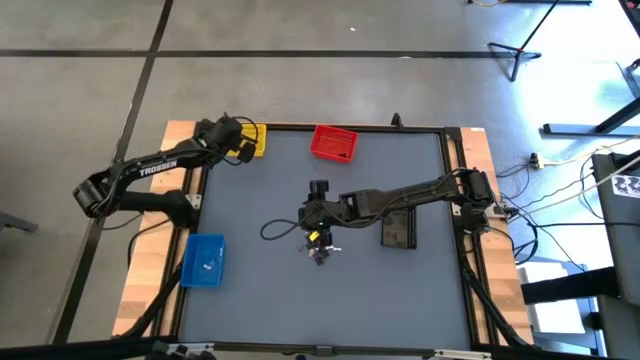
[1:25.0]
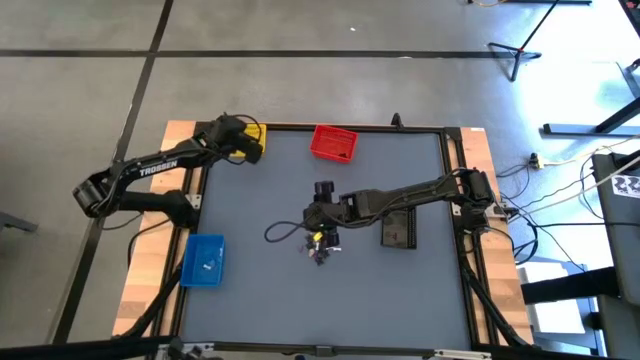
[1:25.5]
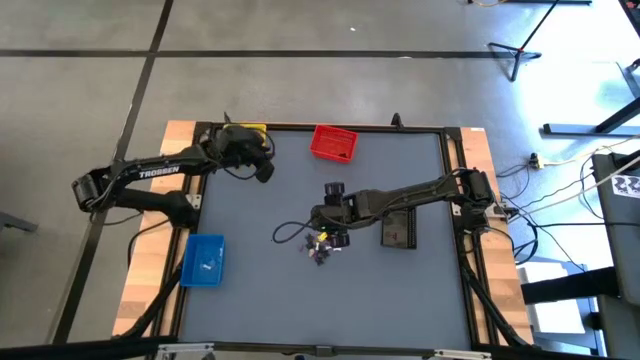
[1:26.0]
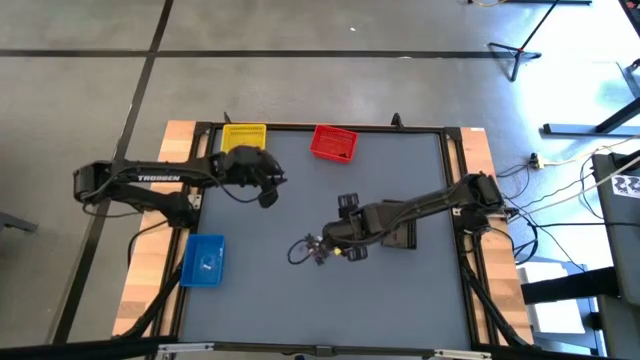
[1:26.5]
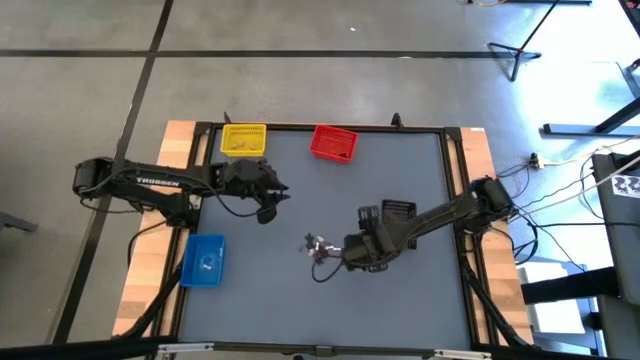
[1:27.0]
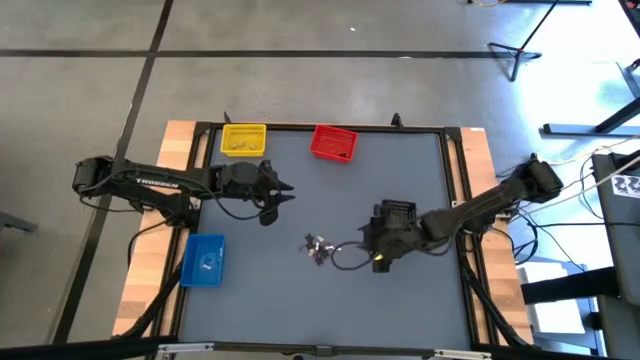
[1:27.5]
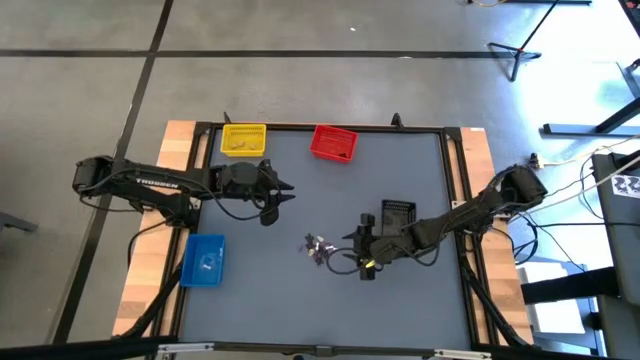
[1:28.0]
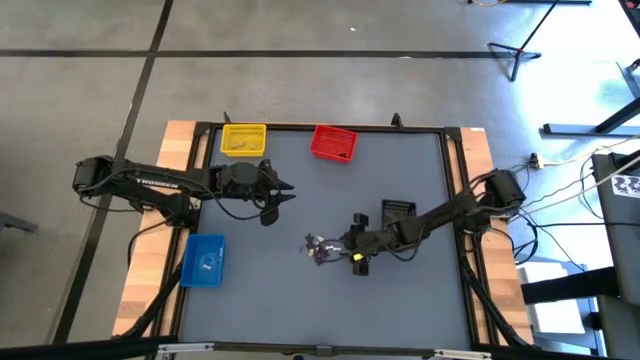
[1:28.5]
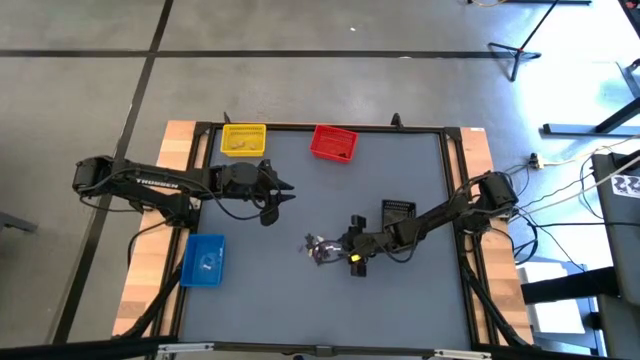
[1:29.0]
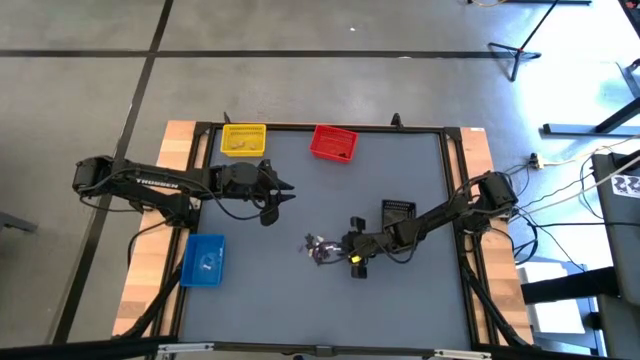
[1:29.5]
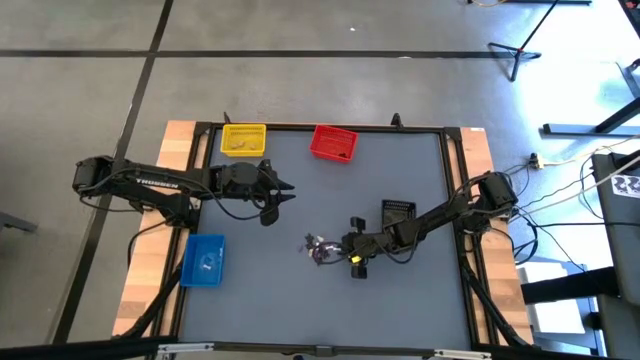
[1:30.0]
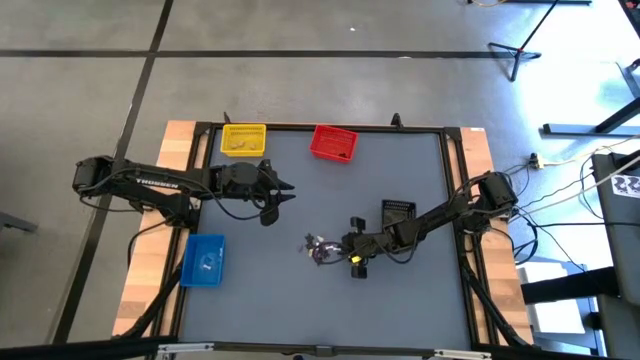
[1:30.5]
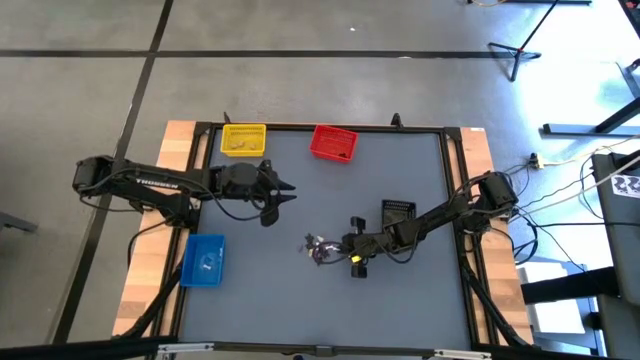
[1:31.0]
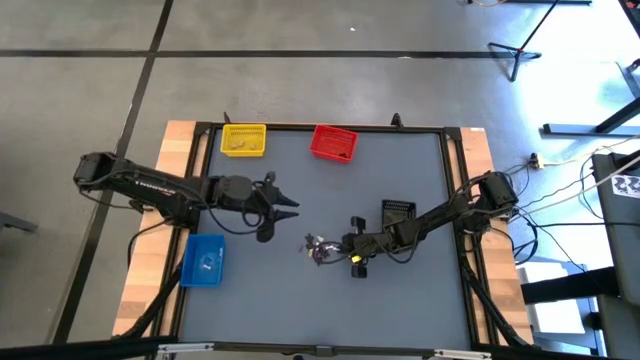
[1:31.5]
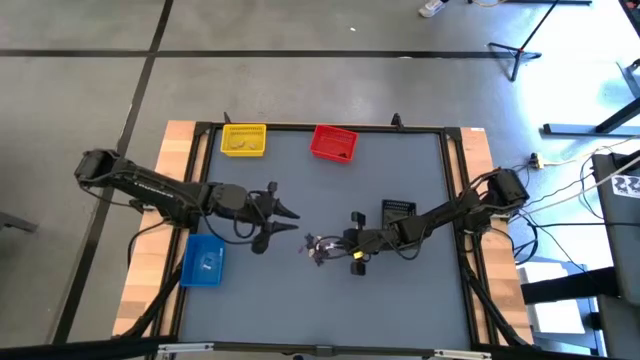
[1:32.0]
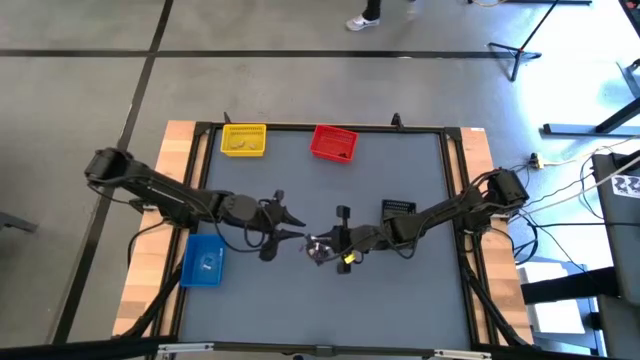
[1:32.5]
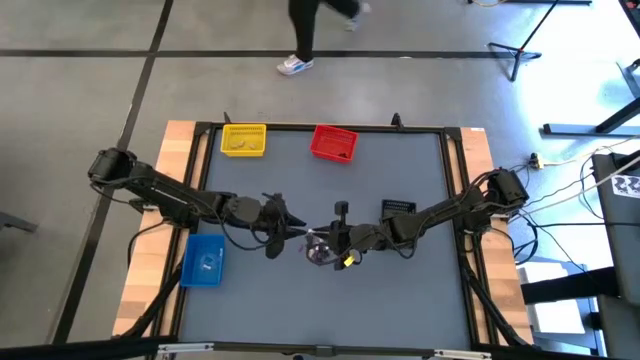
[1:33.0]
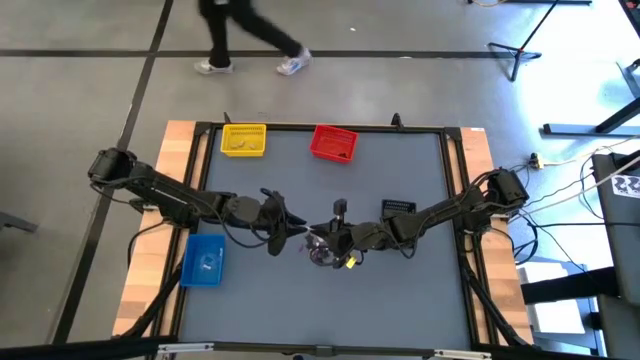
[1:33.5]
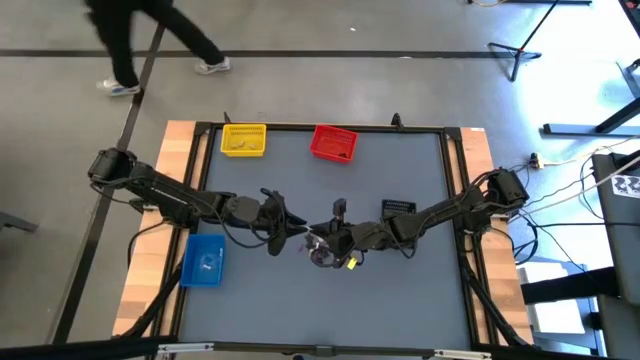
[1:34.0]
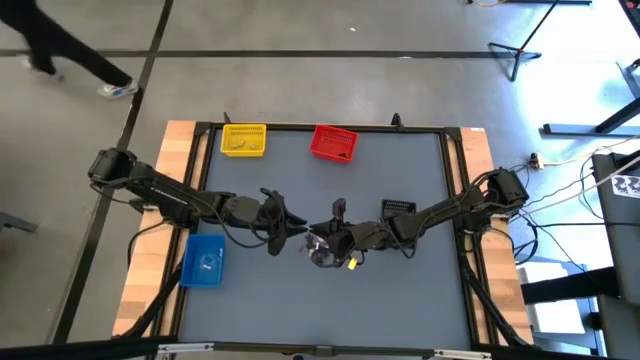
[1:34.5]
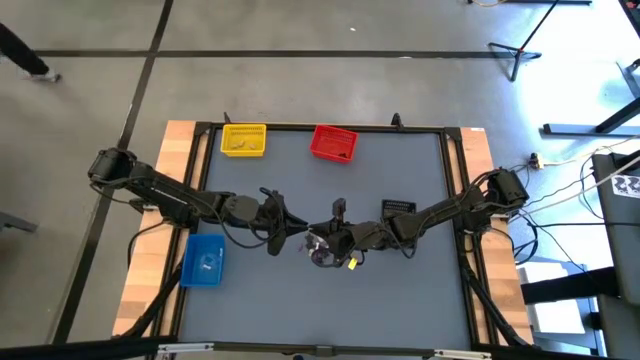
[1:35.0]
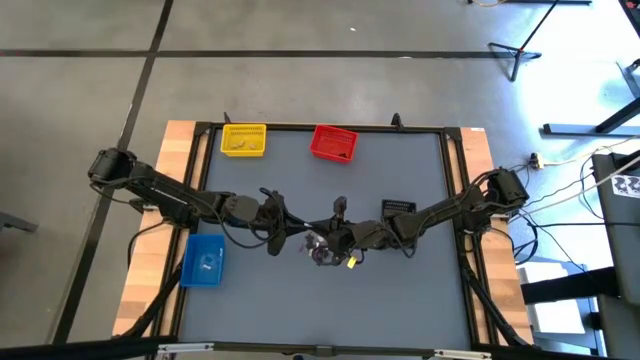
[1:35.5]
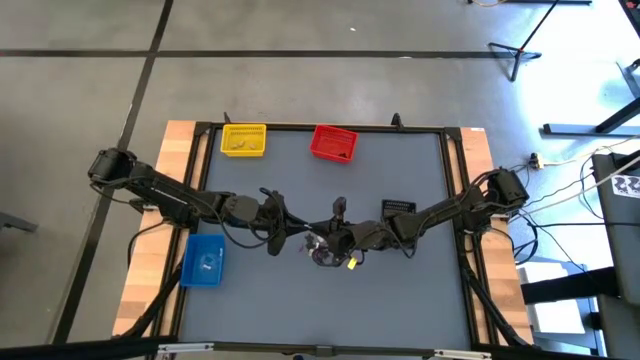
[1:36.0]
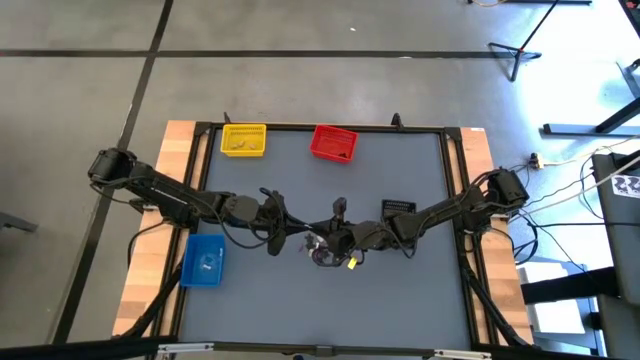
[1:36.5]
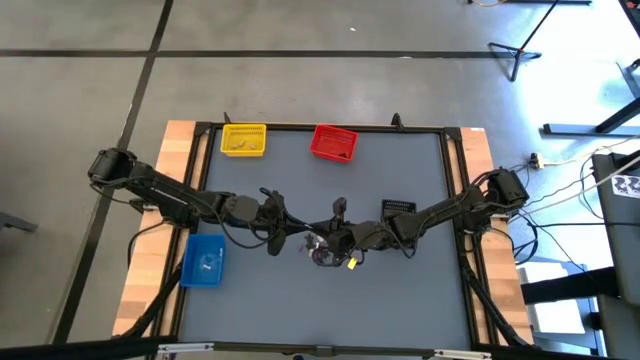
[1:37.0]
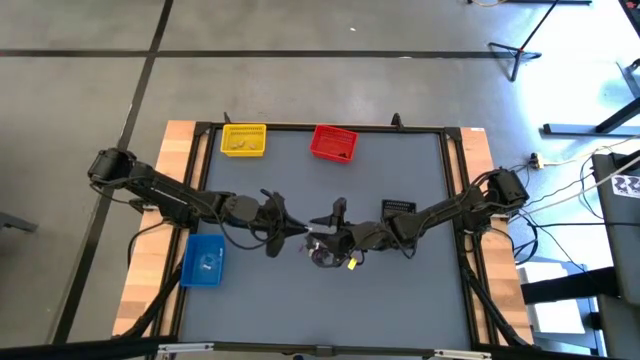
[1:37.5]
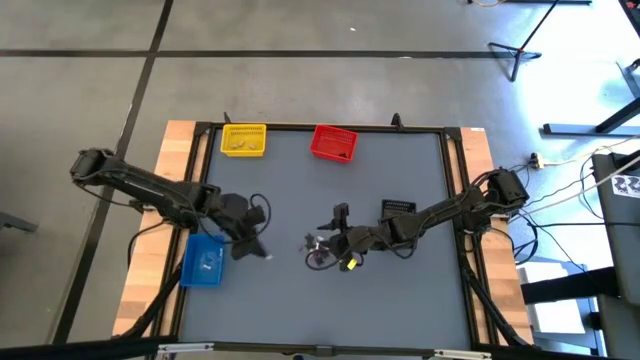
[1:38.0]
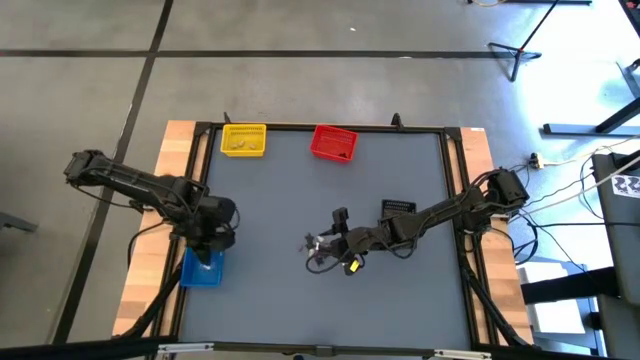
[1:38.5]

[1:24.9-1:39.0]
Task: Sort Halloween decoration
Put the white bone toy into the blue bin

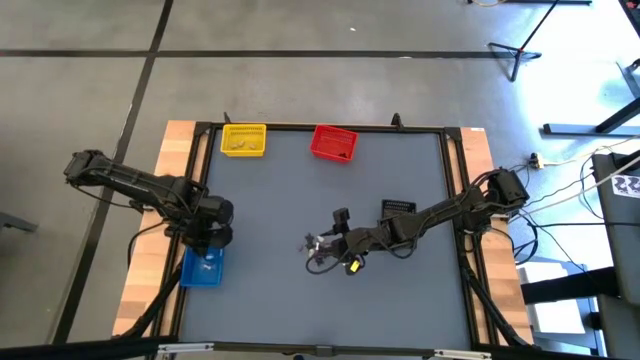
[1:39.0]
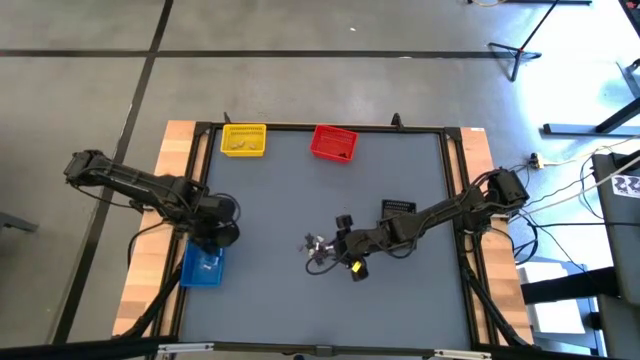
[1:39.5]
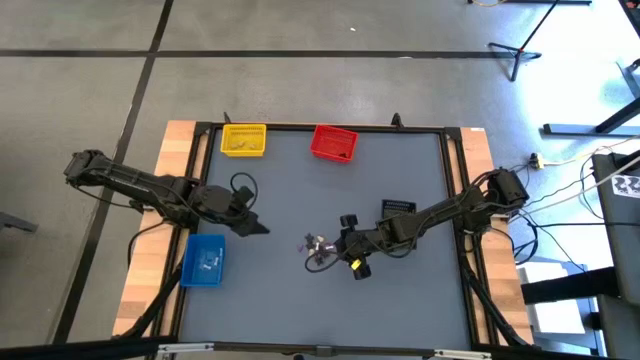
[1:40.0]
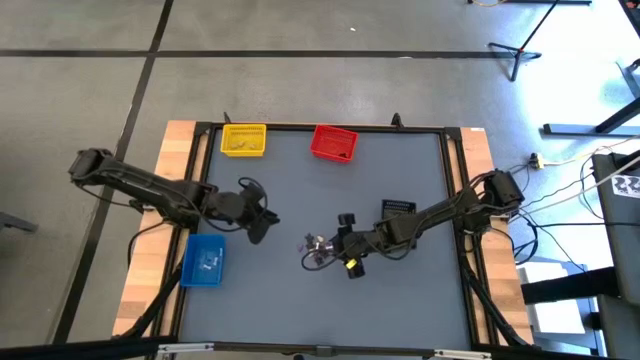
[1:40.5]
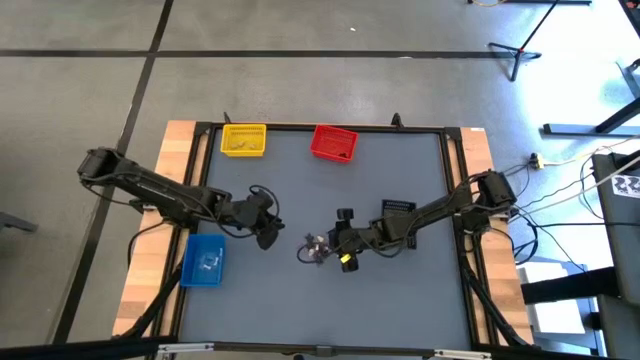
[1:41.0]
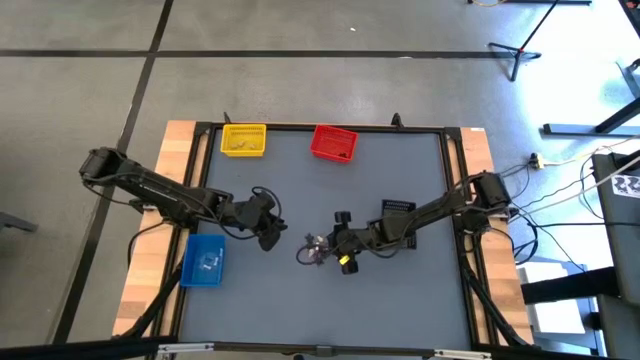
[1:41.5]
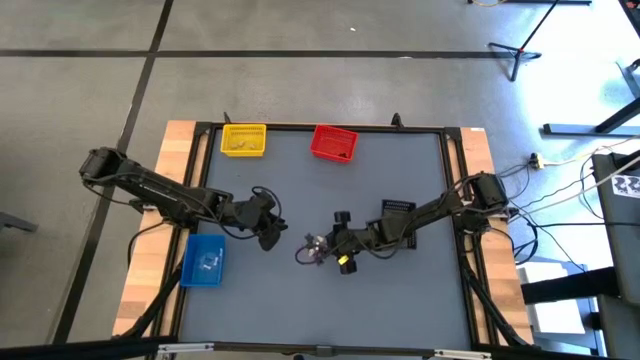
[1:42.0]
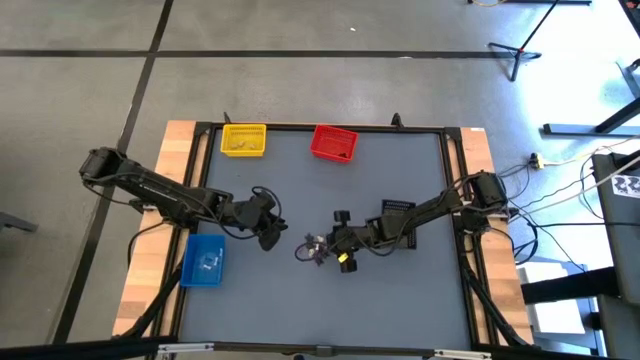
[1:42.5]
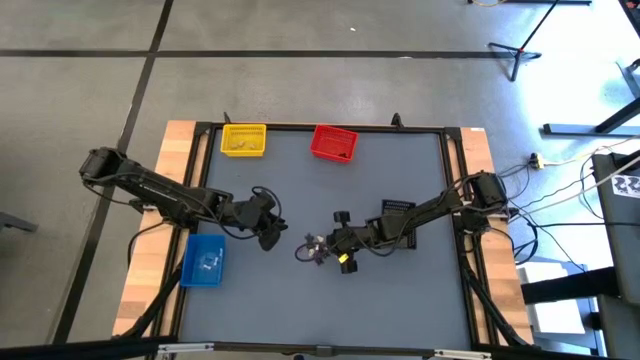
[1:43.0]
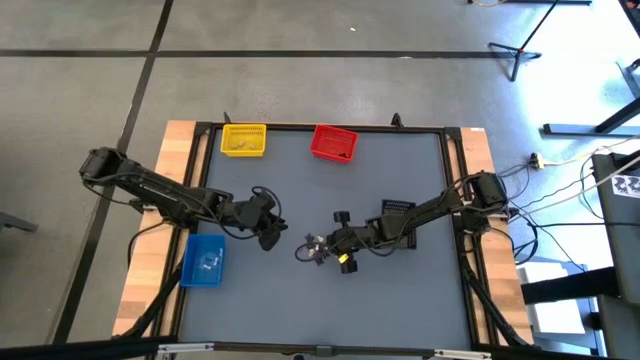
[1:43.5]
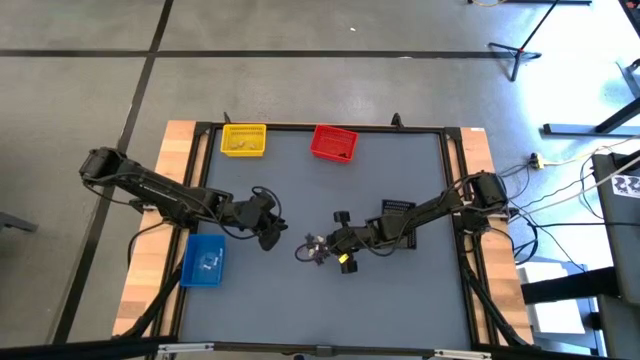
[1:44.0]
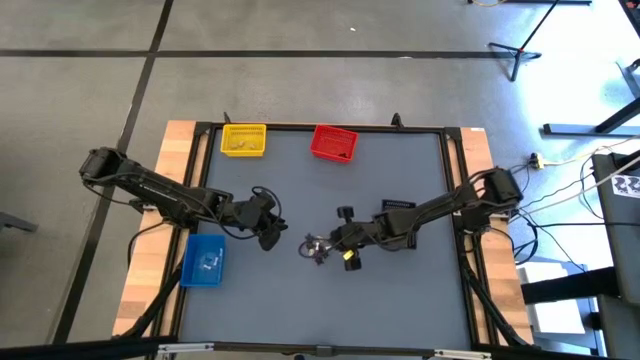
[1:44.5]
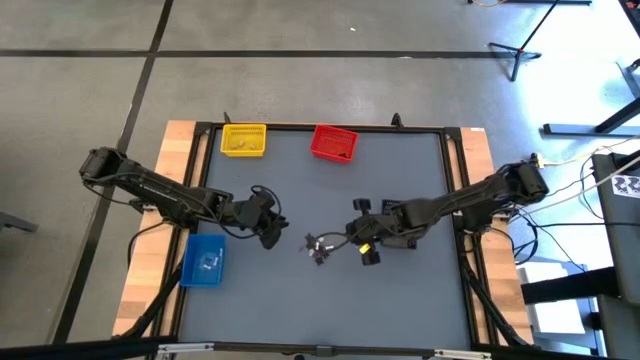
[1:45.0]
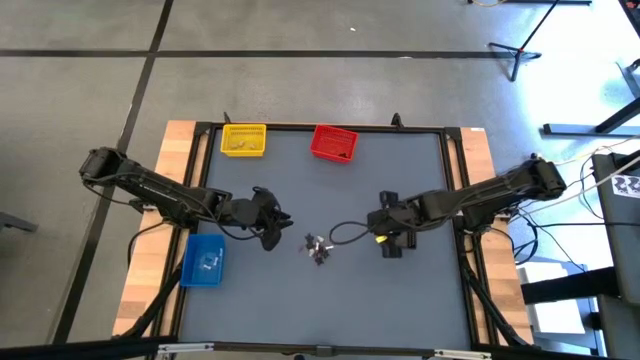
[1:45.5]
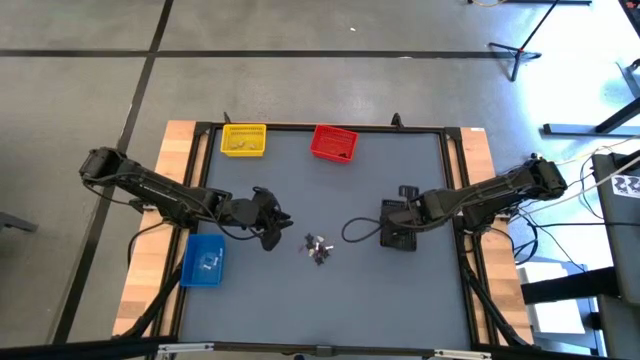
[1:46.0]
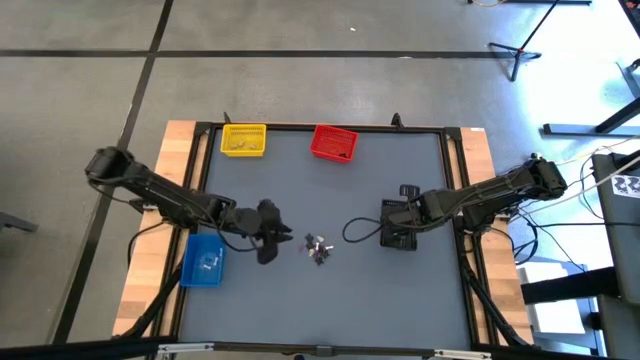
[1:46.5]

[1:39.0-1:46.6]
Put the purple hat toy into the black bin
